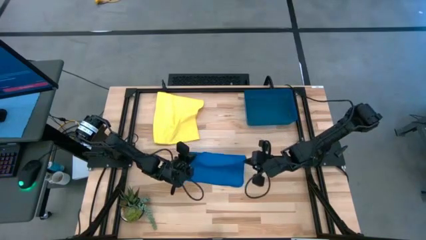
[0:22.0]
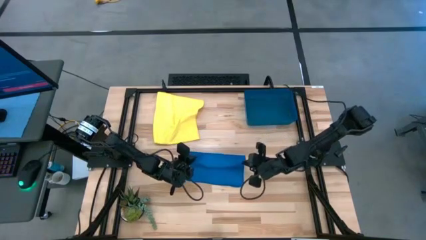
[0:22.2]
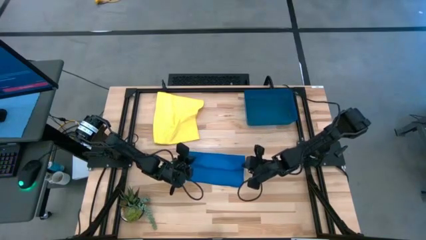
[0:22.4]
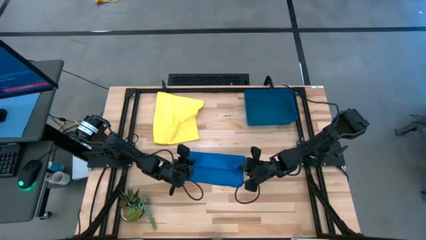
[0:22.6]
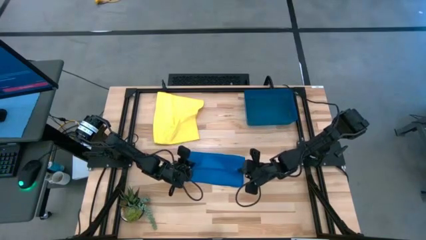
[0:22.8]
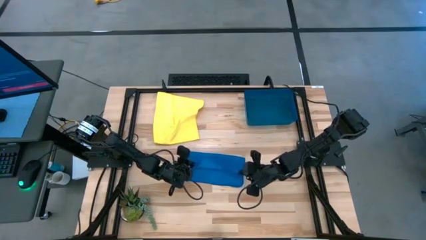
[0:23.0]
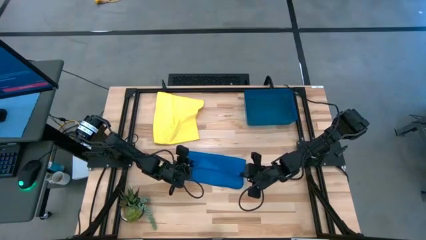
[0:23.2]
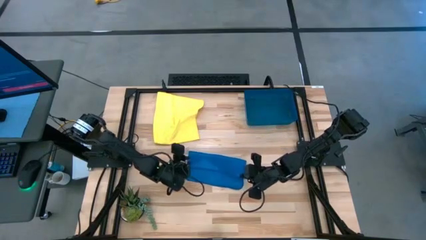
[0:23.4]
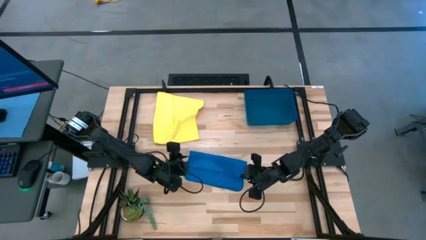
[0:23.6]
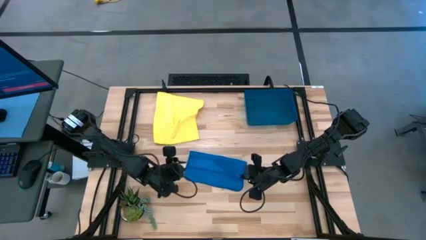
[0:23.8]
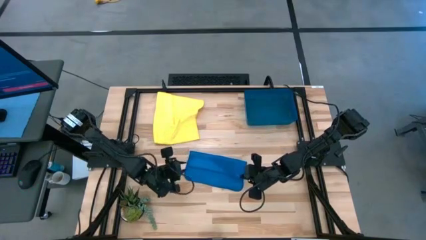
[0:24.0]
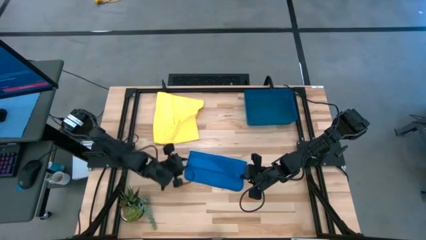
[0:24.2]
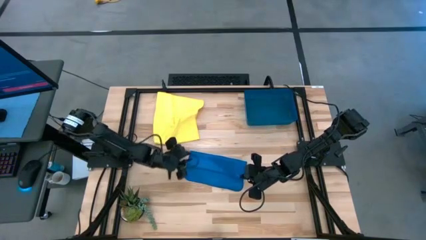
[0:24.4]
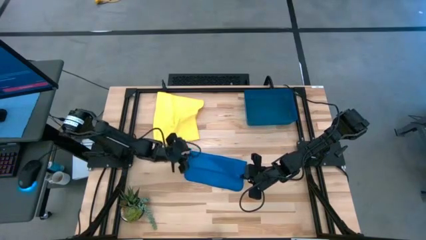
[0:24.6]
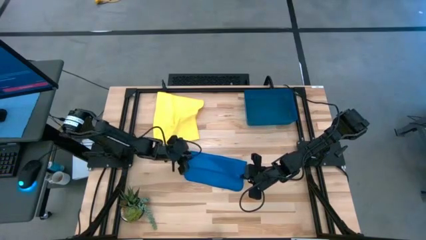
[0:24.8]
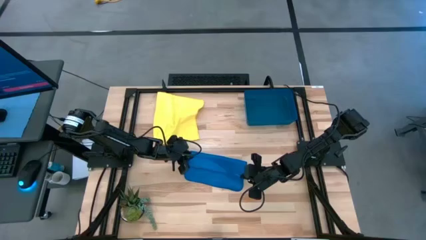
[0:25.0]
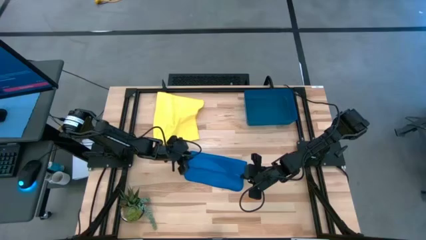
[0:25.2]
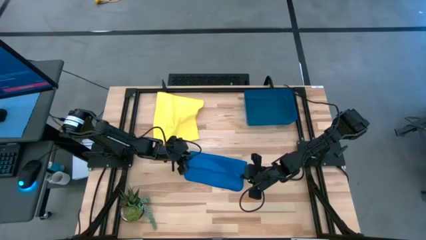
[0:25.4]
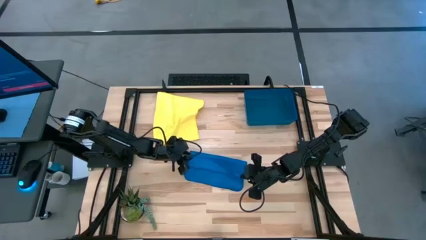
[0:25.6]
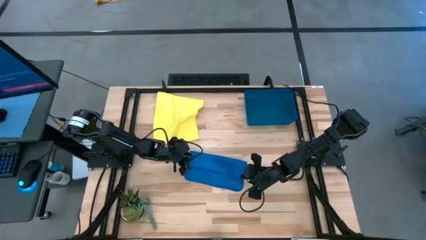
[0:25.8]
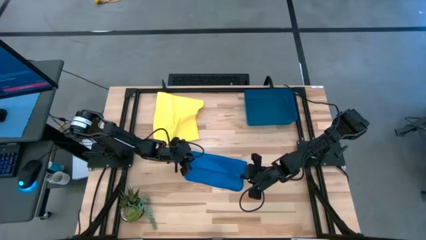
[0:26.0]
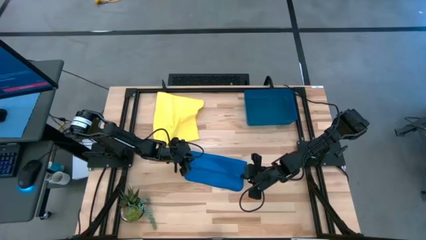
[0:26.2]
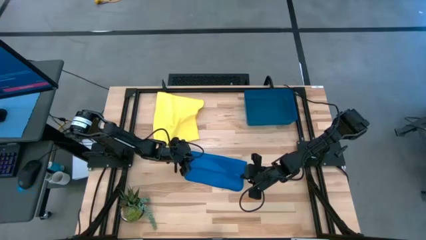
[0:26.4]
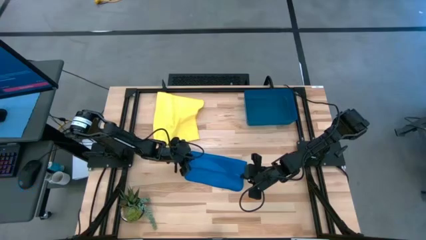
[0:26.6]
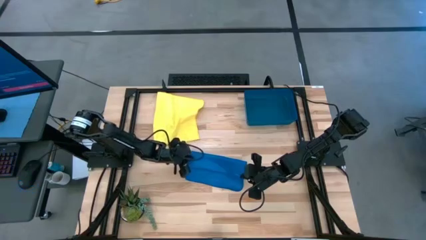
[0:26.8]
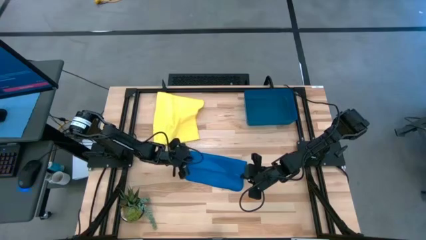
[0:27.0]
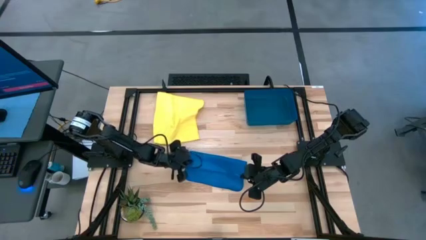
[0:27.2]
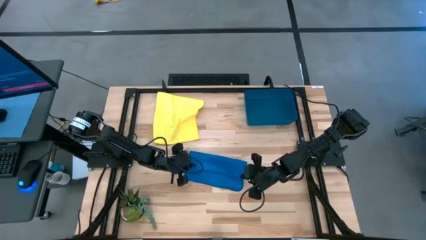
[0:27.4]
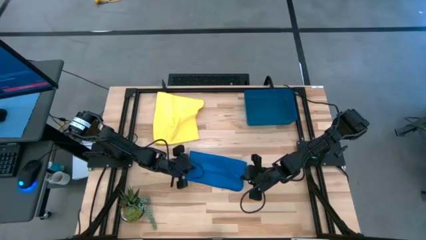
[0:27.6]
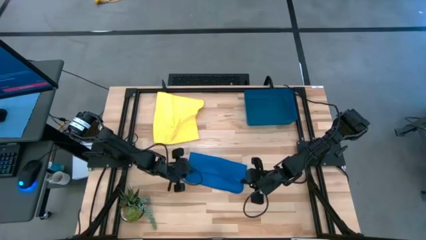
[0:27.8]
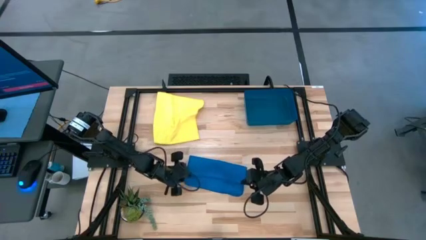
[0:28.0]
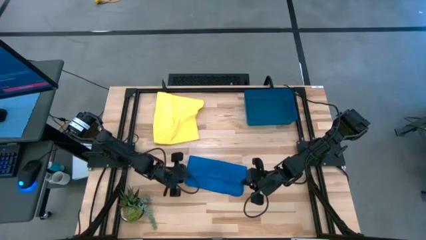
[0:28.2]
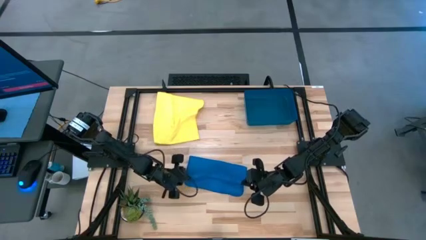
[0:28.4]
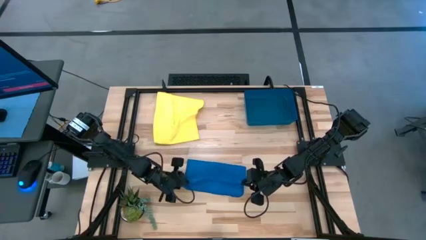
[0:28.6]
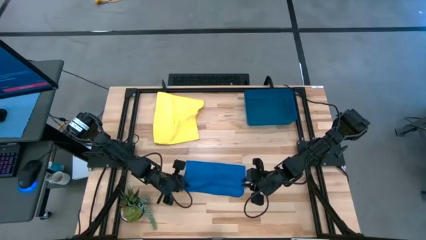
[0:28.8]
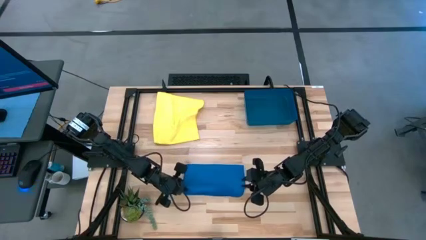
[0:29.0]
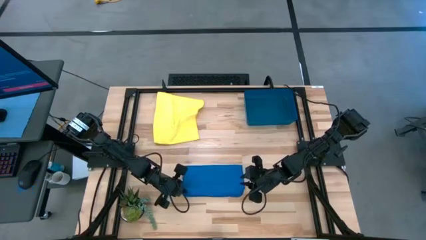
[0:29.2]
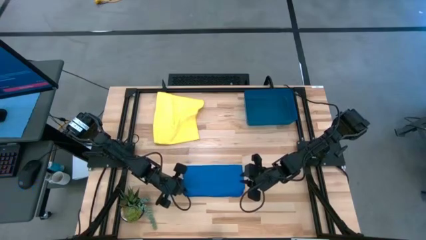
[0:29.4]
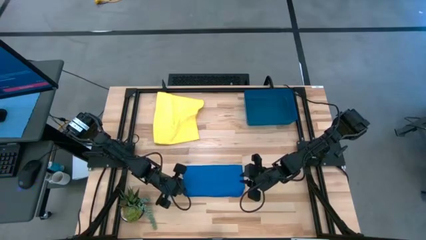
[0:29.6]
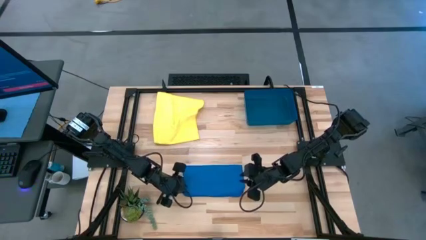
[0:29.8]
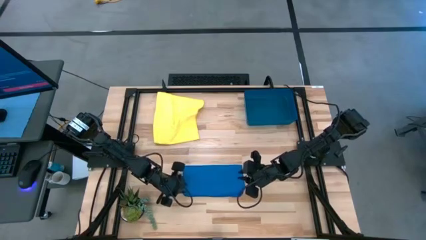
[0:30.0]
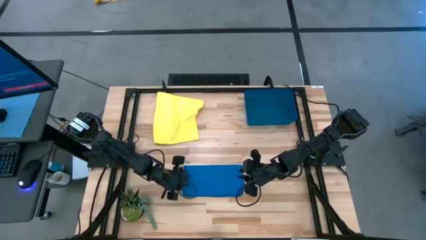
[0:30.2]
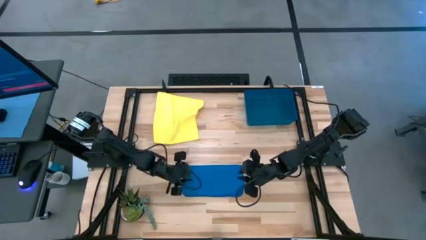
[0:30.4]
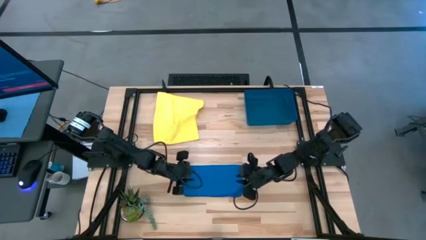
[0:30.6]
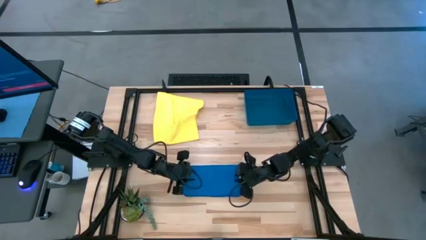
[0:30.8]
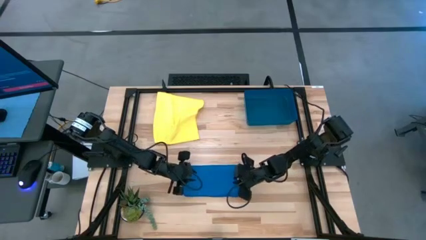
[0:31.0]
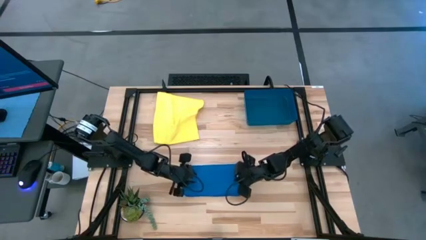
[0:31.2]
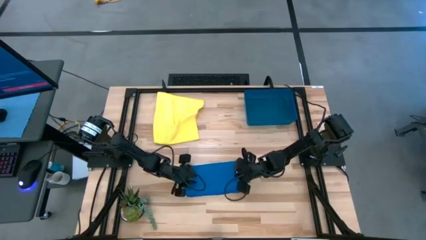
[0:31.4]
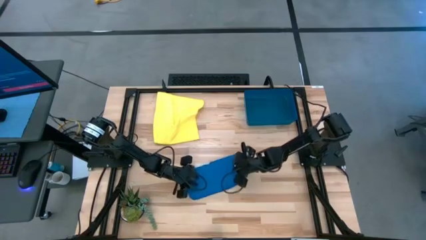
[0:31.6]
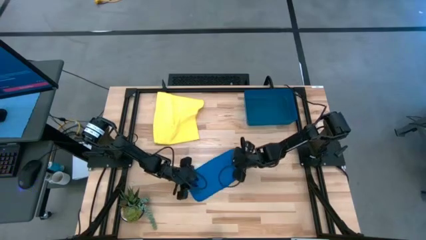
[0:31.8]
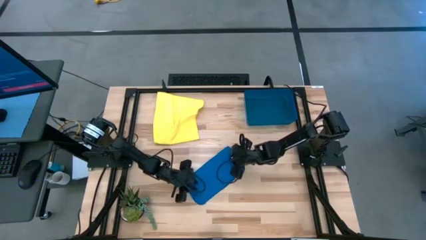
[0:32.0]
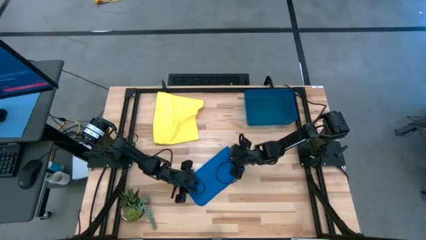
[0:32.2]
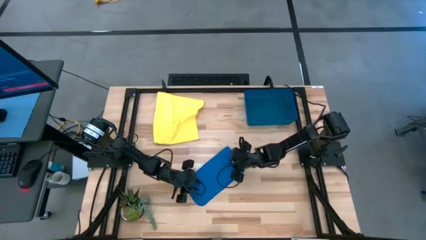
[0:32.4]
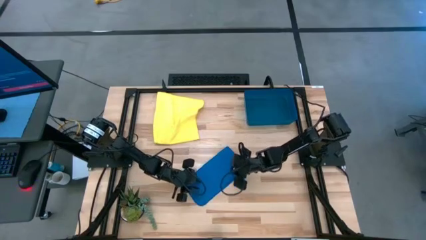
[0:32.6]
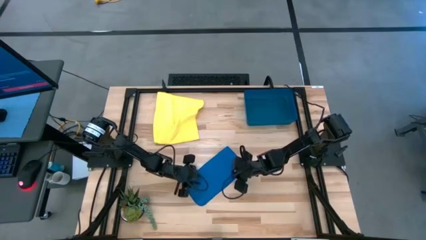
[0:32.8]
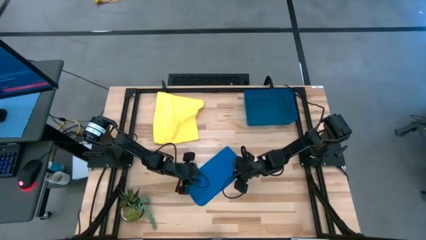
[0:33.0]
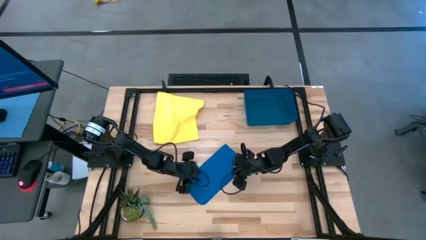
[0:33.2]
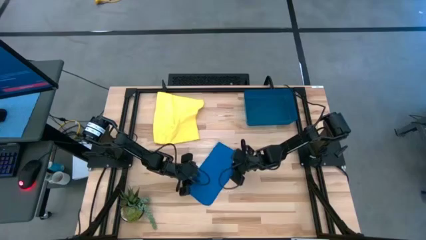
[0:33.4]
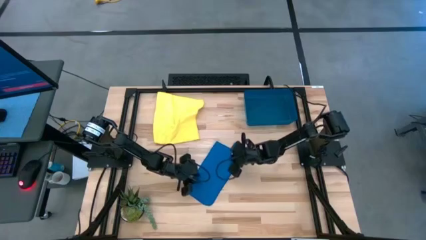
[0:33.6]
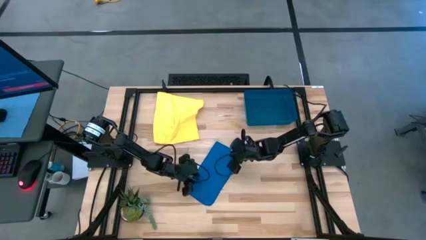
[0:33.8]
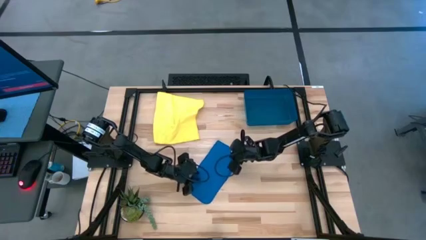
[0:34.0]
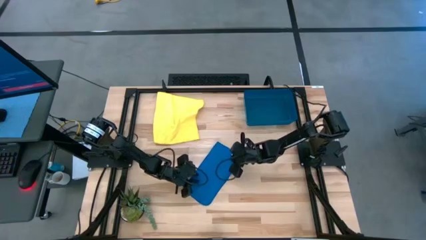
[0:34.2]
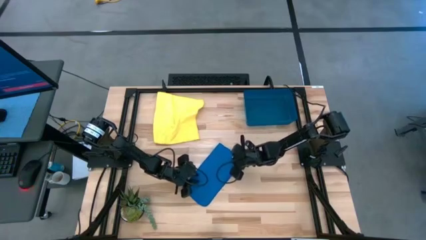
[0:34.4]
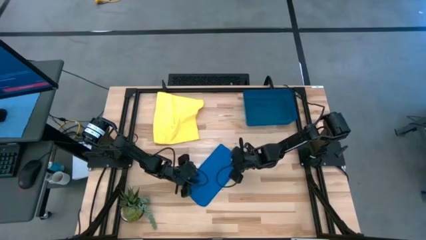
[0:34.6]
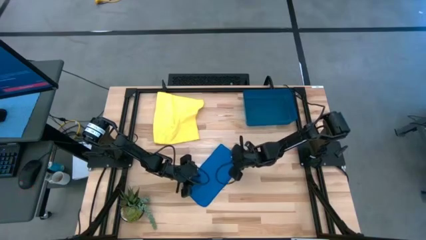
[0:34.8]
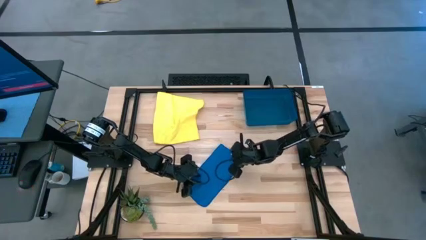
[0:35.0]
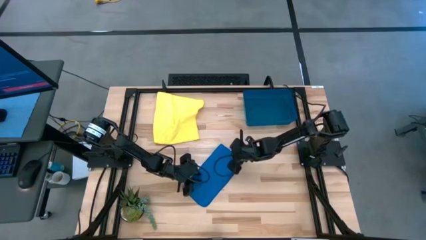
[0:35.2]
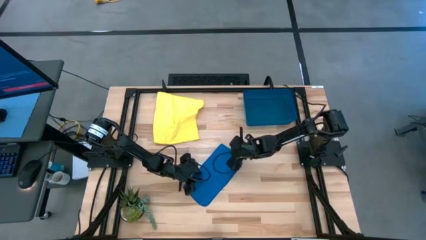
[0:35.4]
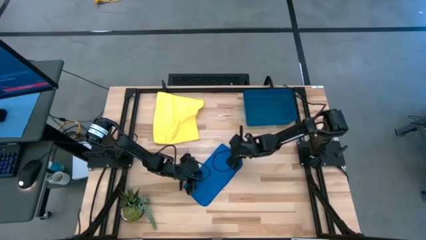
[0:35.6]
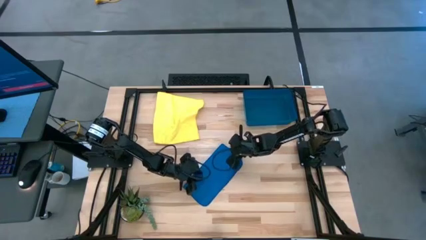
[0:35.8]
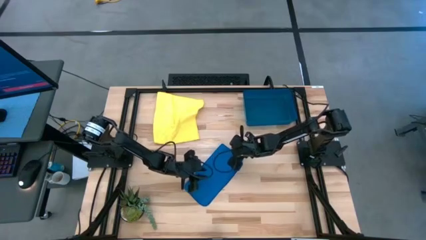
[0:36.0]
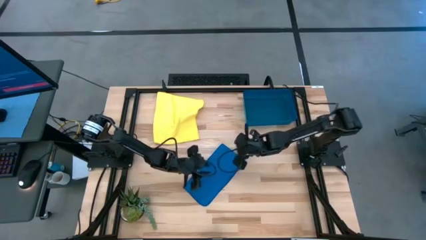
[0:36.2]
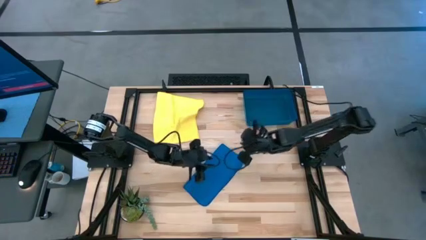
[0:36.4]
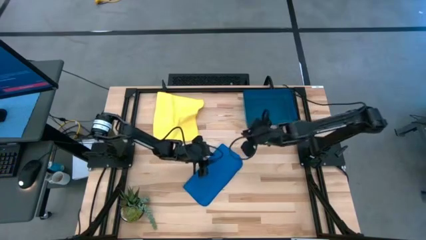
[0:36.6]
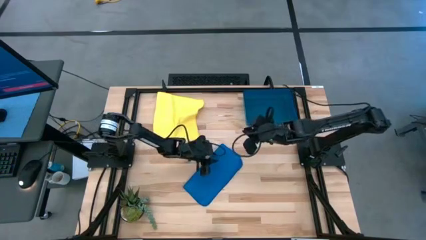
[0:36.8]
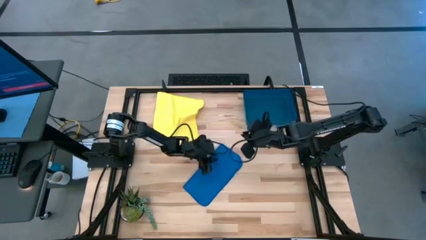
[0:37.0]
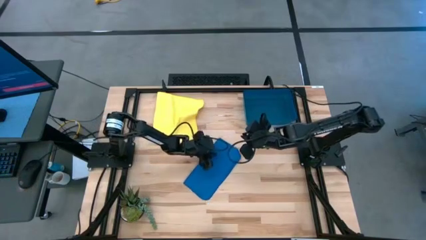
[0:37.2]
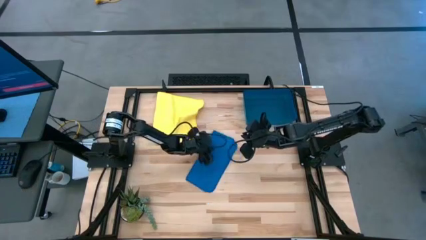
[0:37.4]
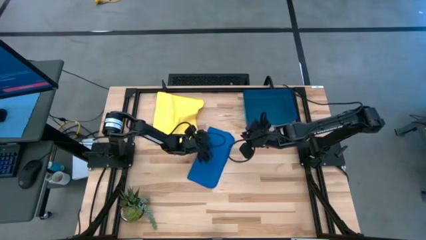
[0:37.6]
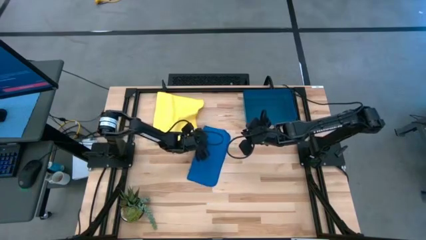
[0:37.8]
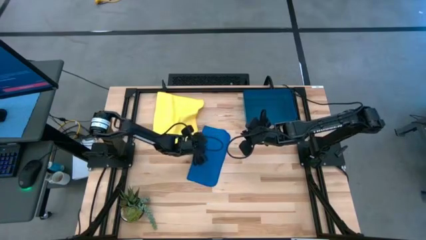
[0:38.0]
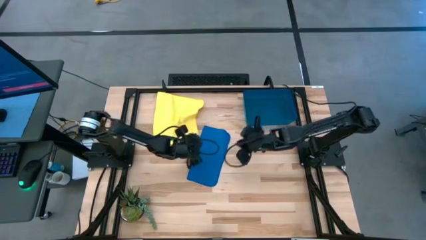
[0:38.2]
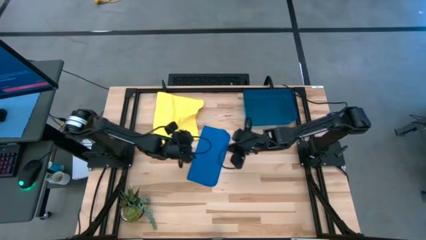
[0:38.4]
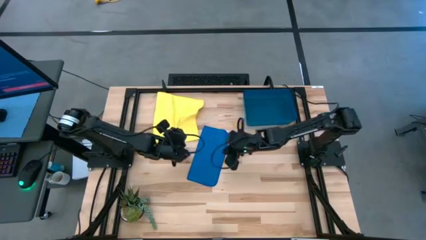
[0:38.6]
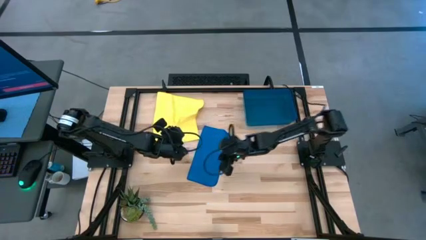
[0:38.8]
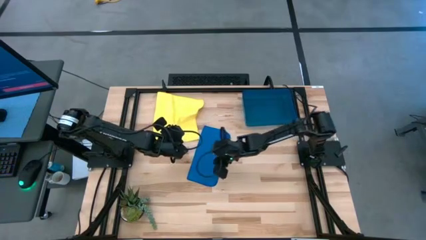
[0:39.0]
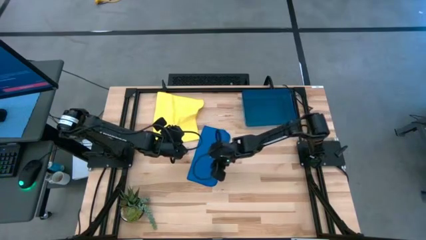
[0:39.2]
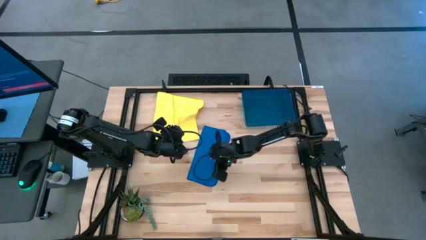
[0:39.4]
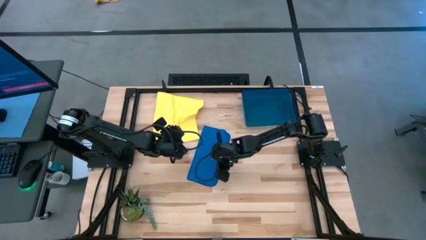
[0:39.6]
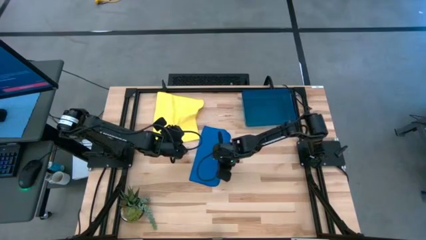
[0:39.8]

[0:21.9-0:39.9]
Task: Roll microfiber towels into tight, uniform cylinder then place into a basket
Roll the blue microfiber cloth
